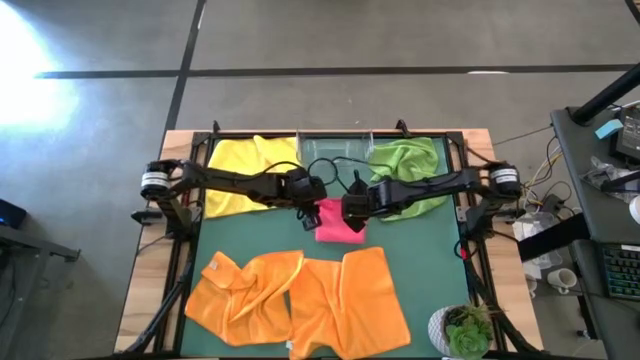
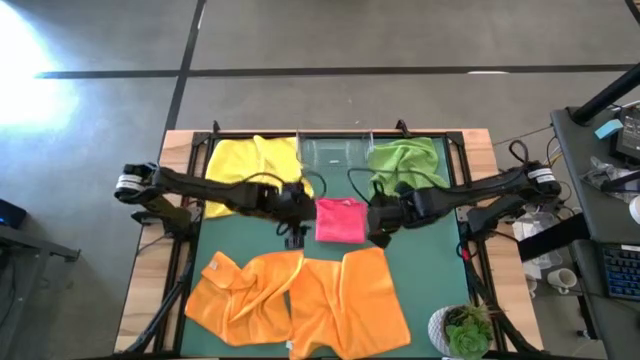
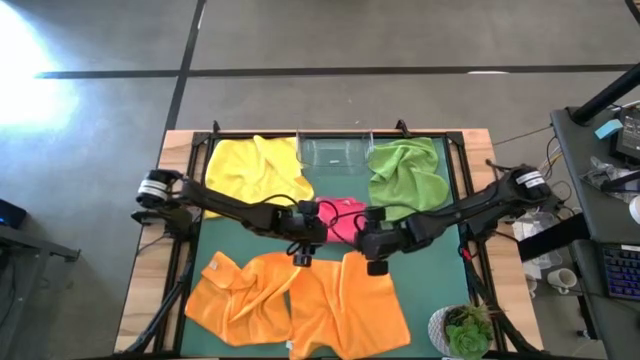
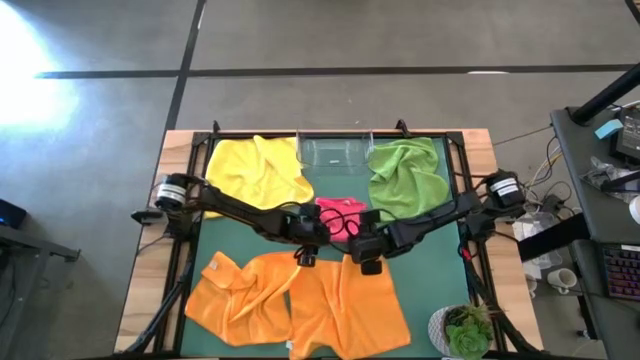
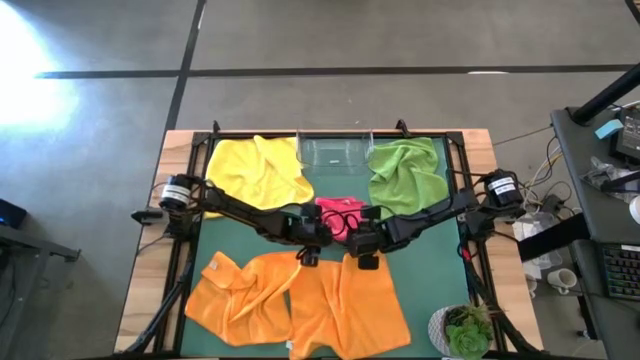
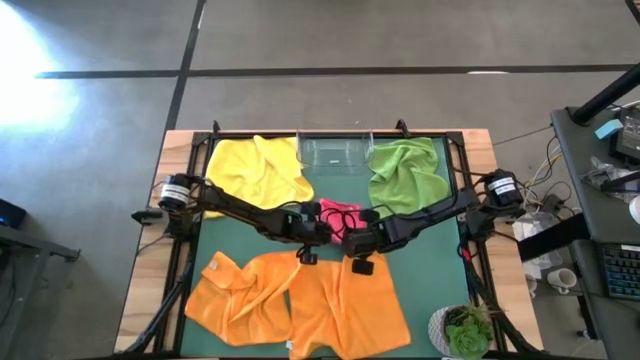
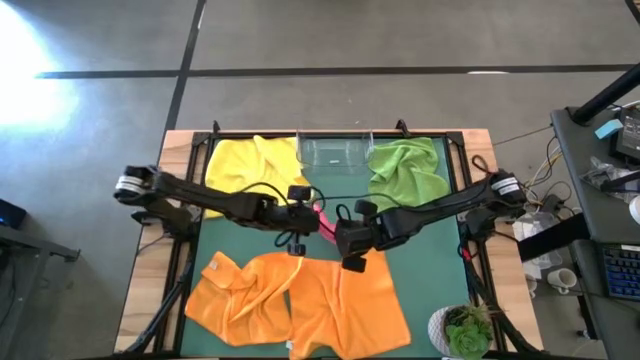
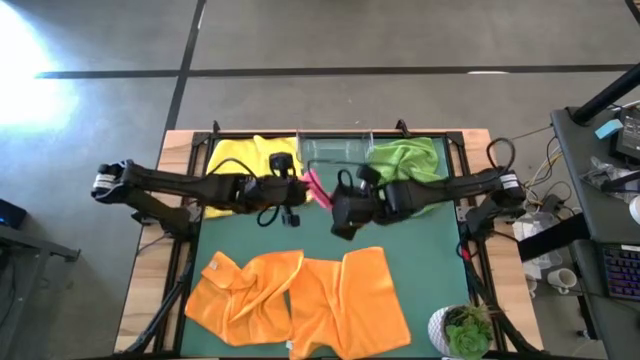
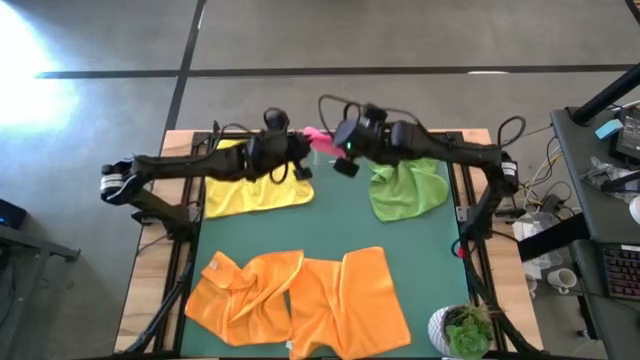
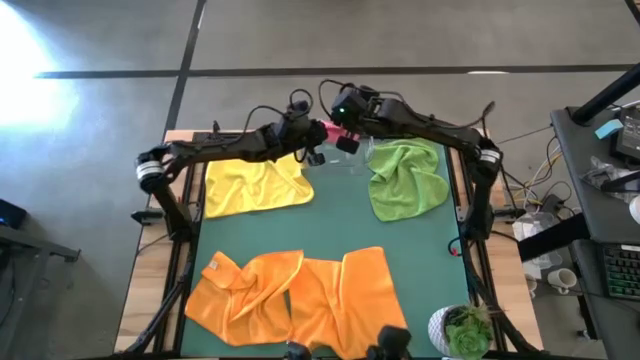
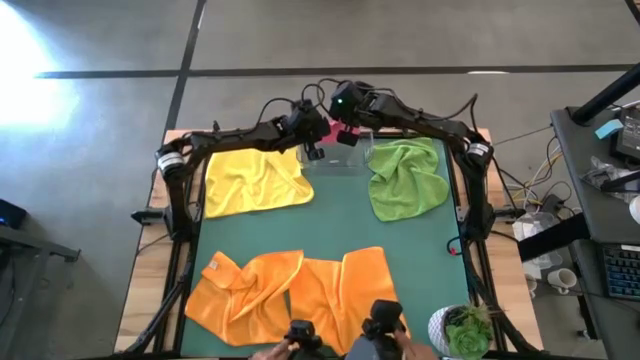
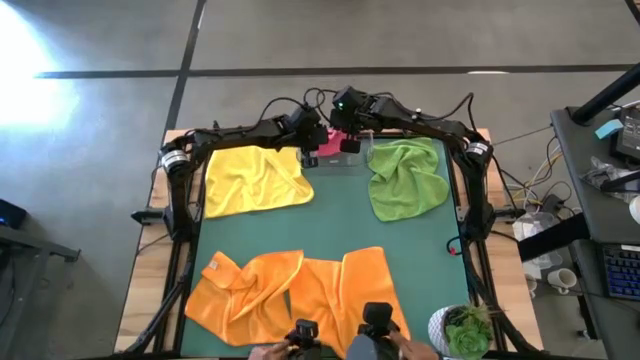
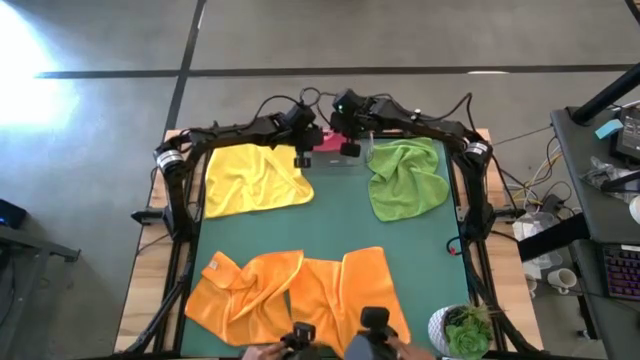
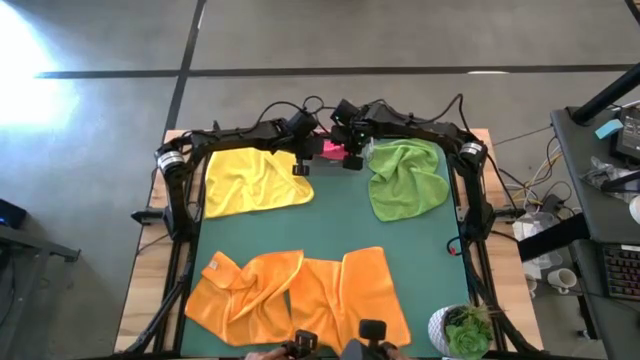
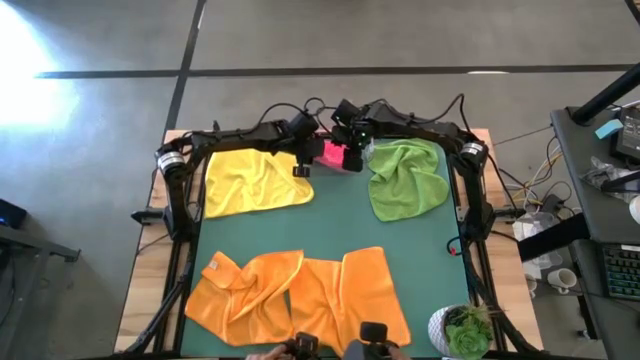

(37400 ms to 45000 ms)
Task: Fold microfiber towels
Put the pink microfiber towel into the transparent bin

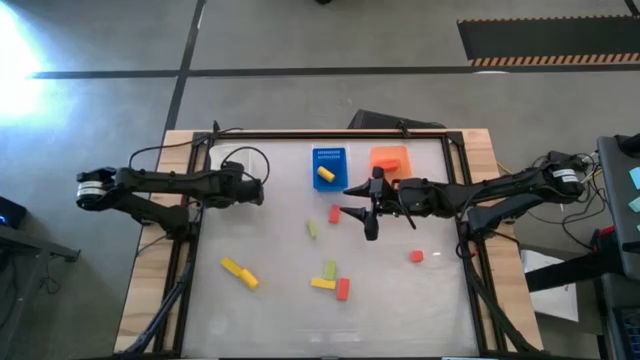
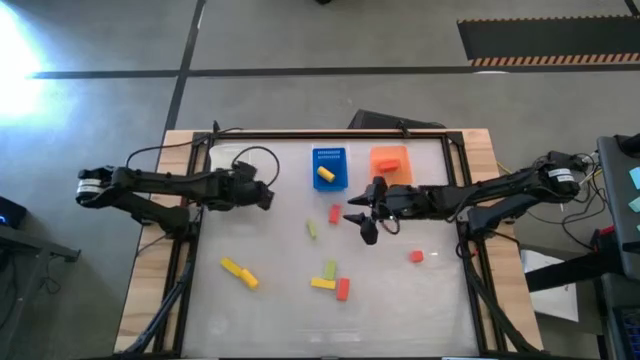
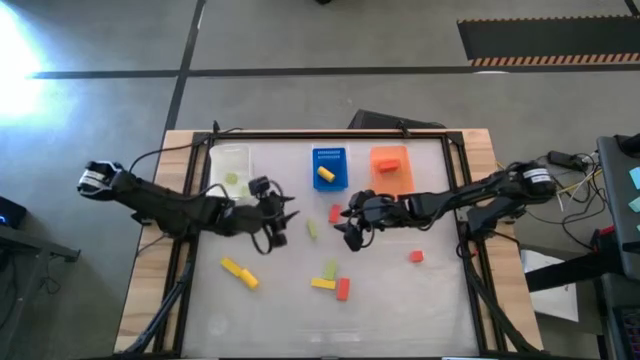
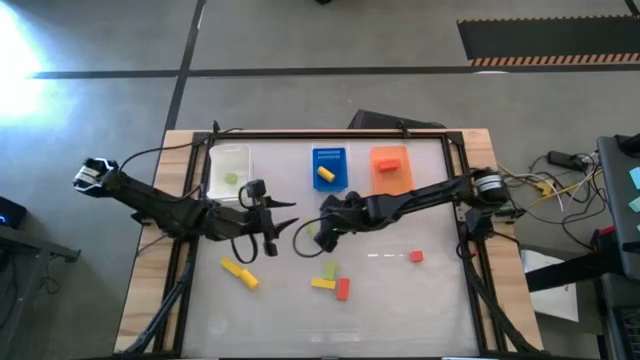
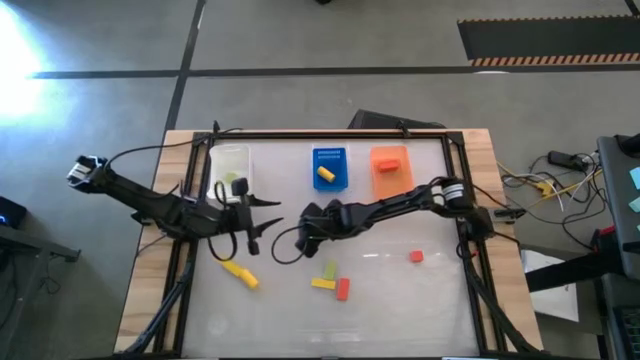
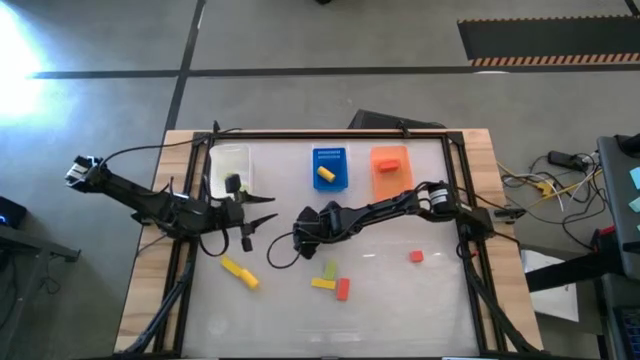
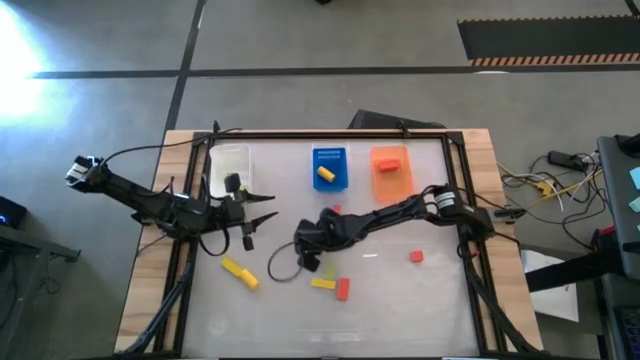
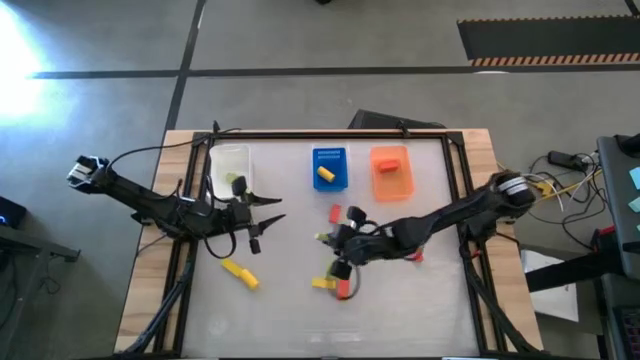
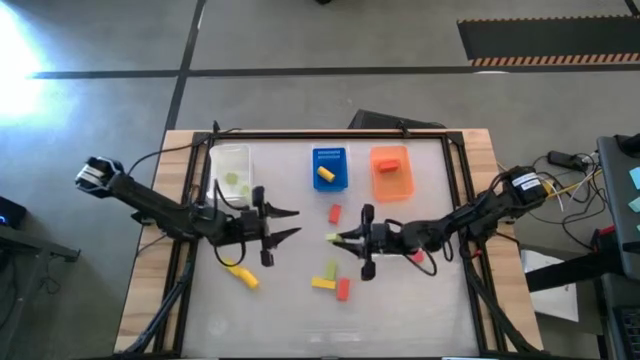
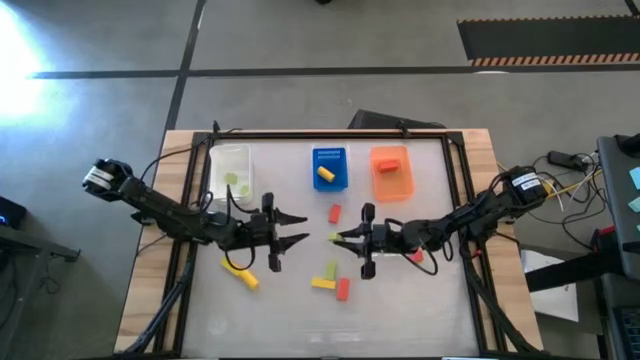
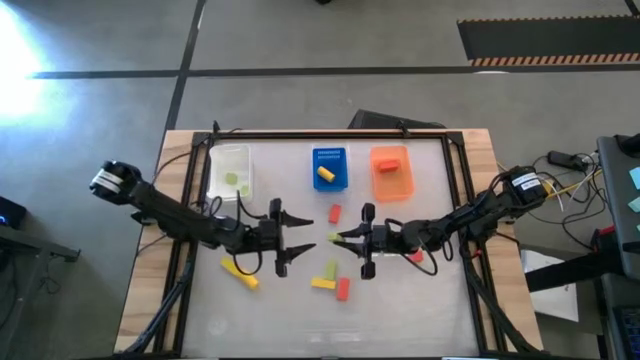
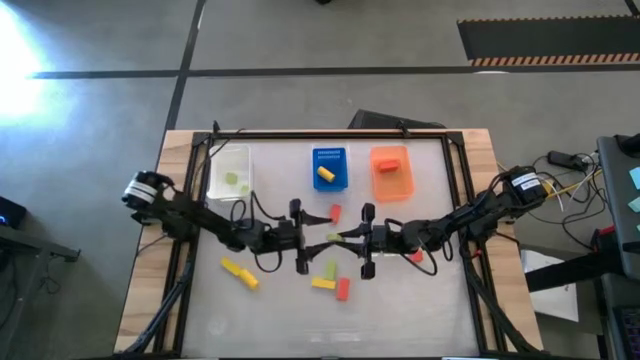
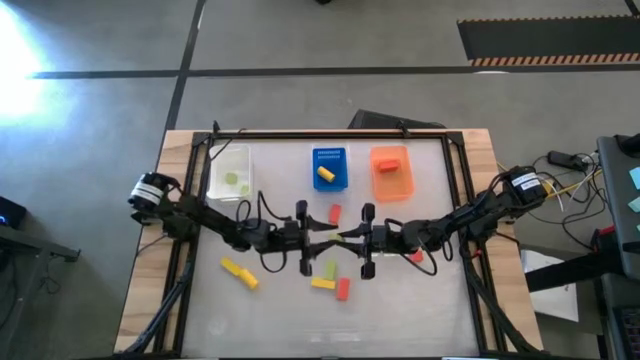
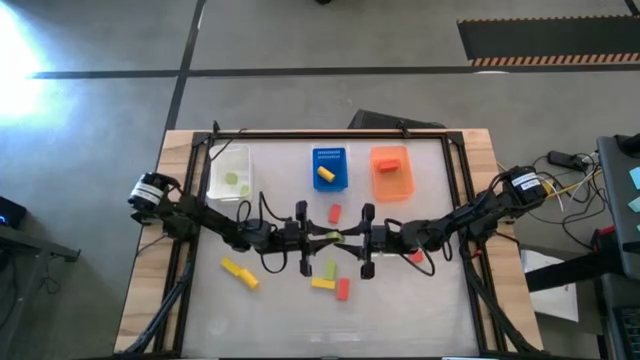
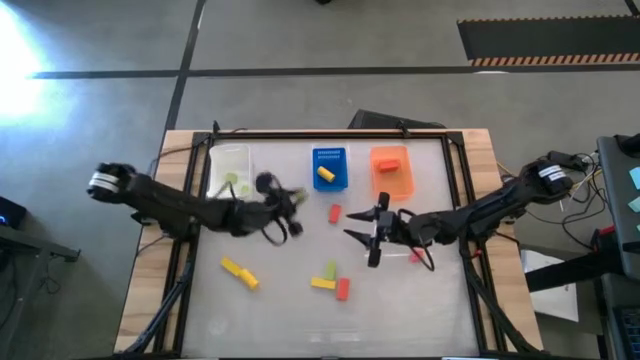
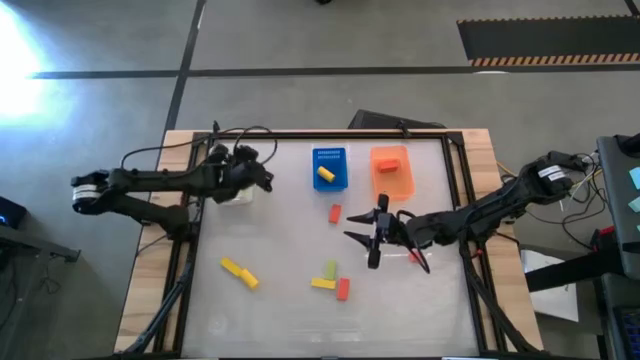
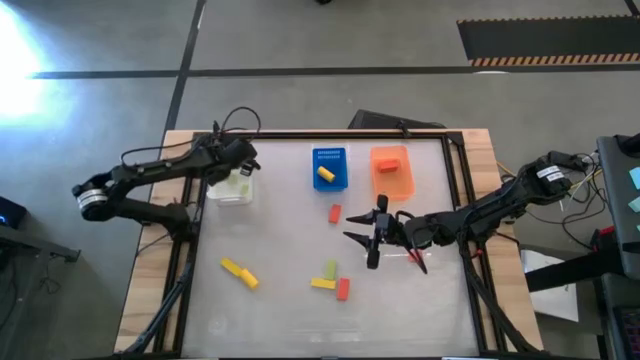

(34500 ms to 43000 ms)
Task: Sort & place blocks by color
Put the green block into the white bin
